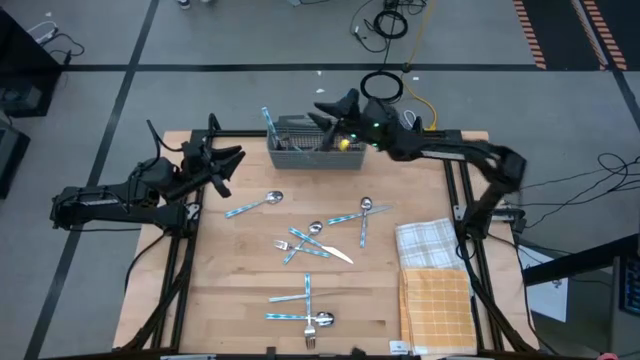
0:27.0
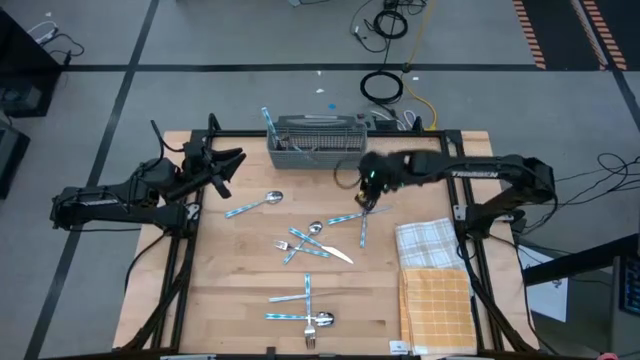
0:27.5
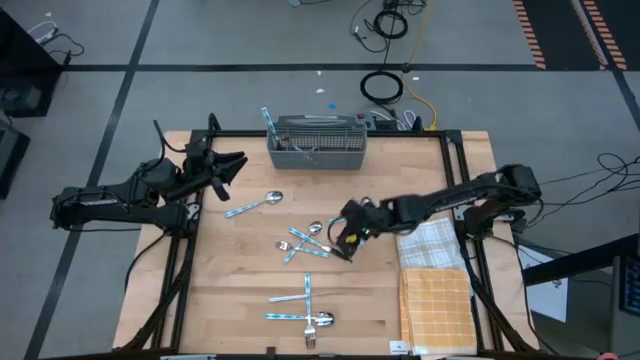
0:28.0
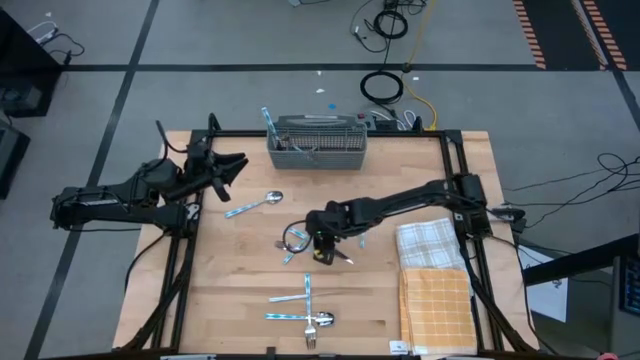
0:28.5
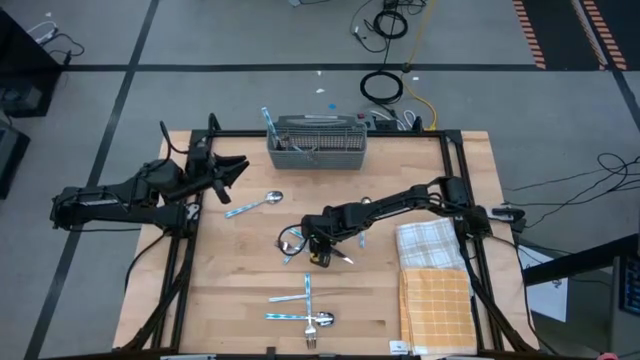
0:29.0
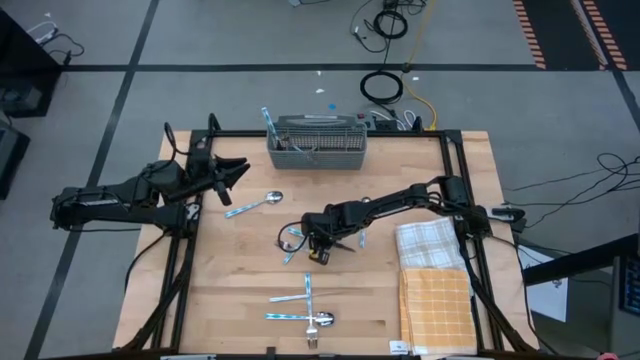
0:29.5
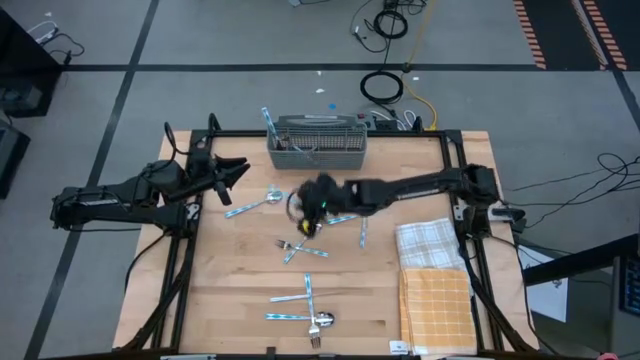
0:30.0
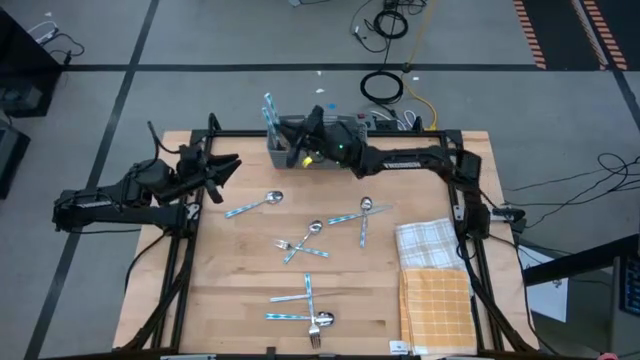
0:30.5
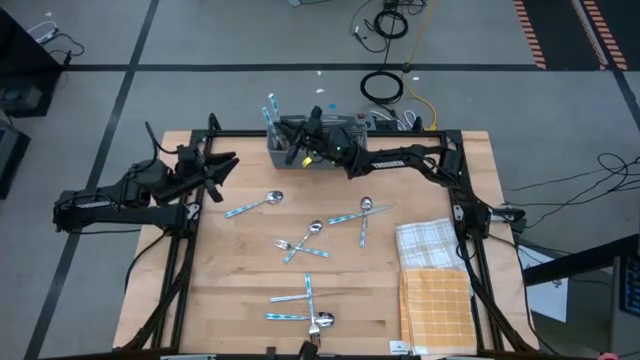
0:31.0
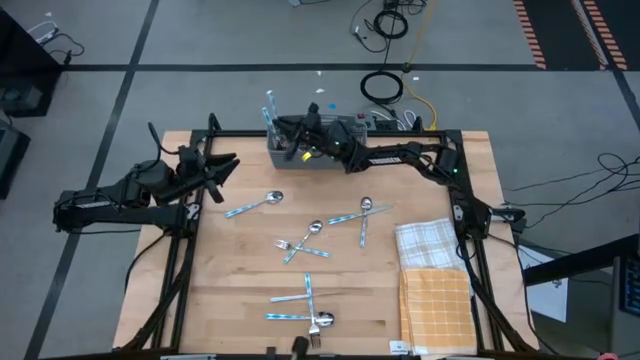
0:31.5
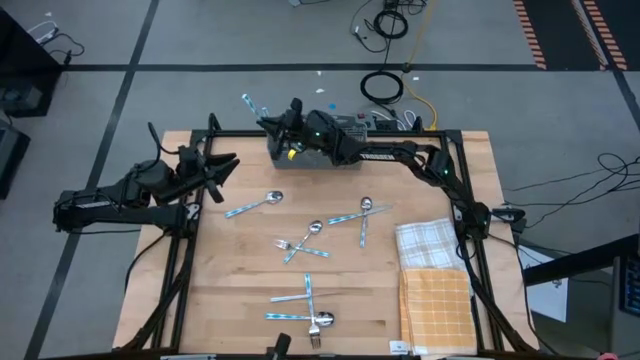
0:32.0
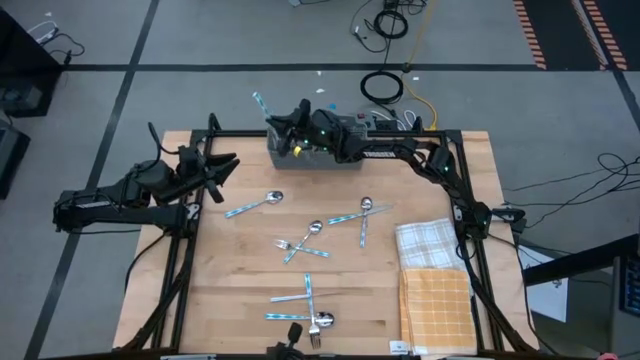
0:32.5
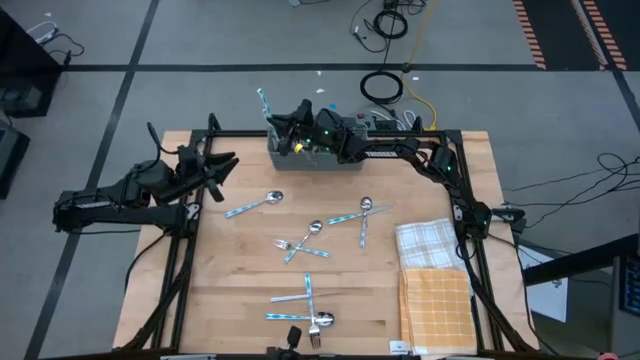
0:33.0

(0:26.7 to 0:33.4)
Task: Sort silverware
Put the middle knife into the left section of the utensil holder

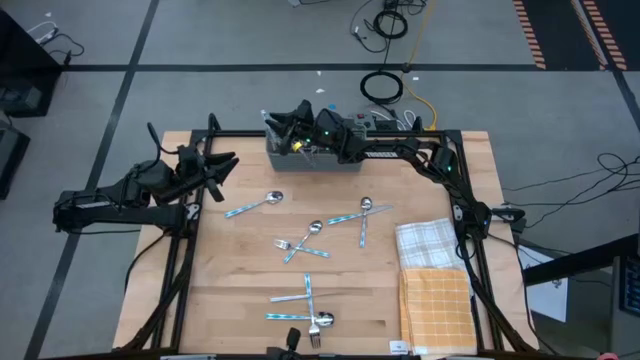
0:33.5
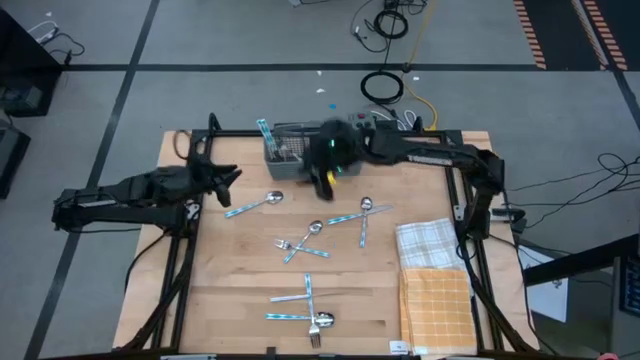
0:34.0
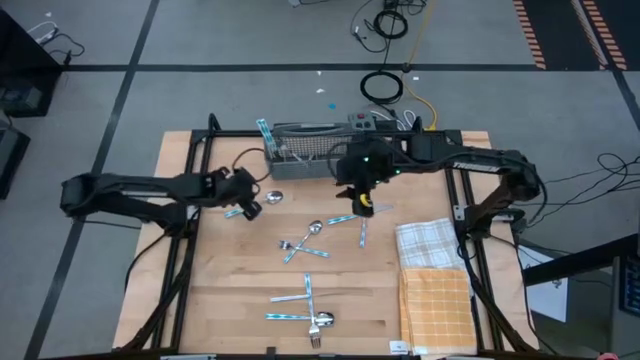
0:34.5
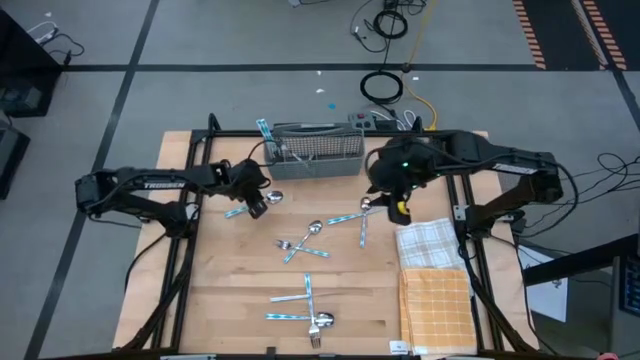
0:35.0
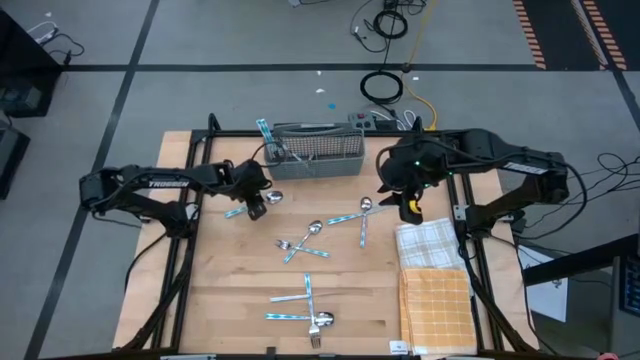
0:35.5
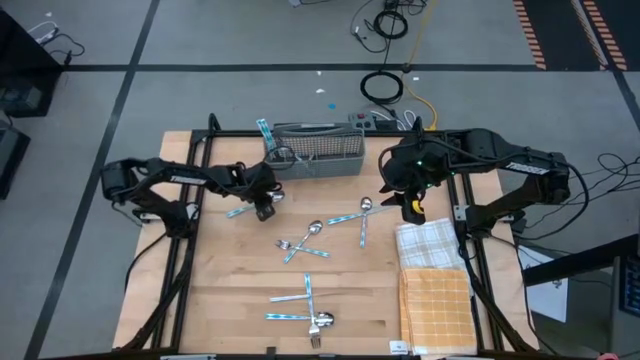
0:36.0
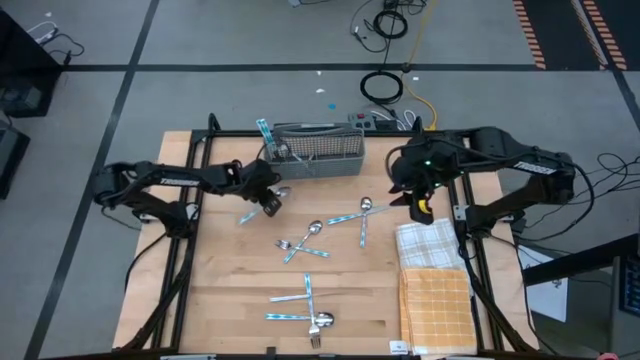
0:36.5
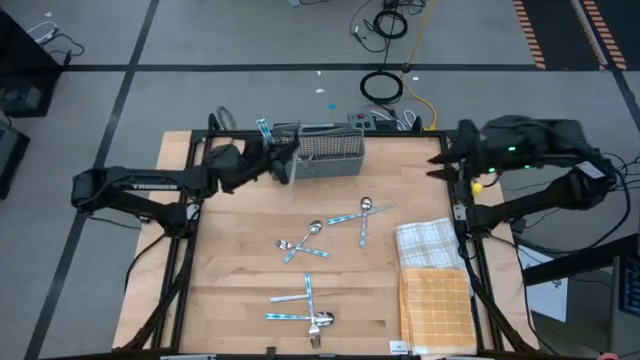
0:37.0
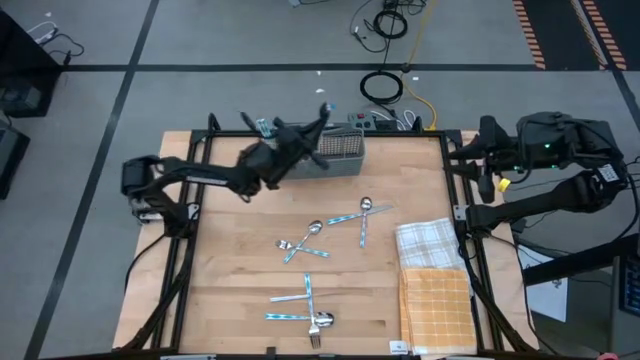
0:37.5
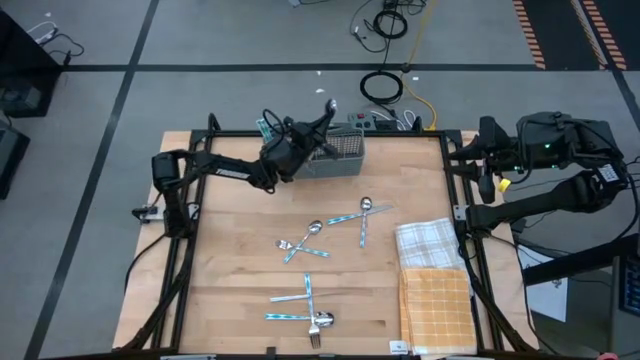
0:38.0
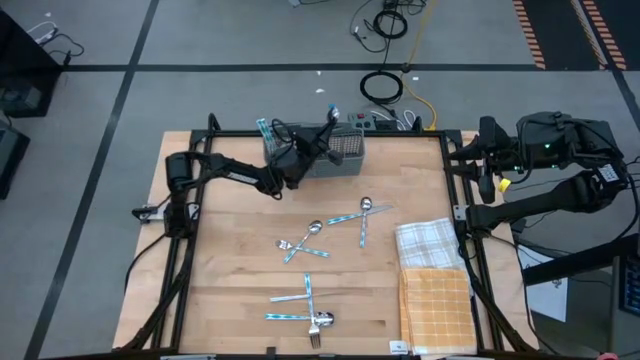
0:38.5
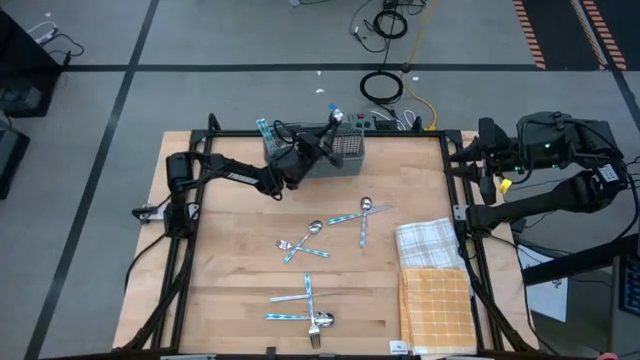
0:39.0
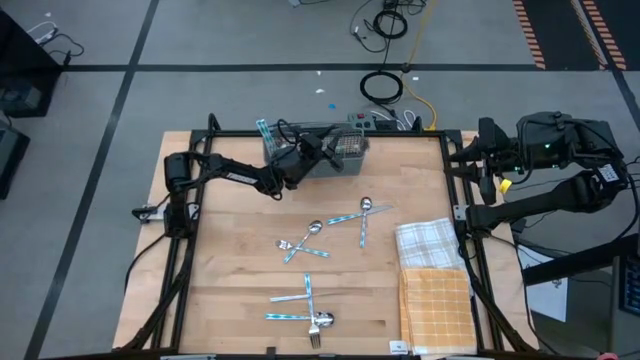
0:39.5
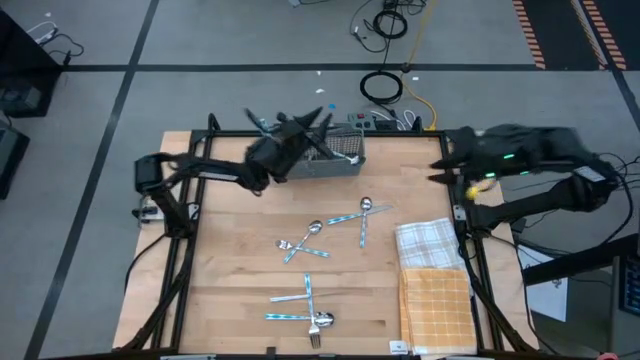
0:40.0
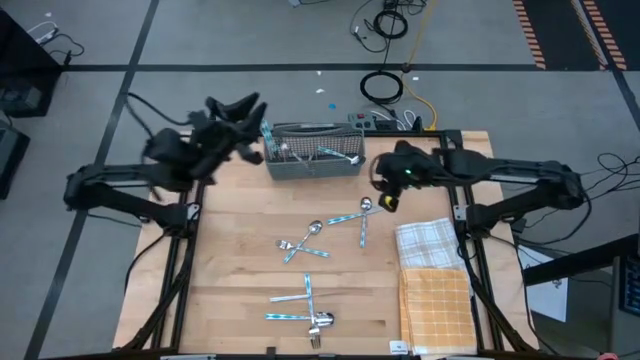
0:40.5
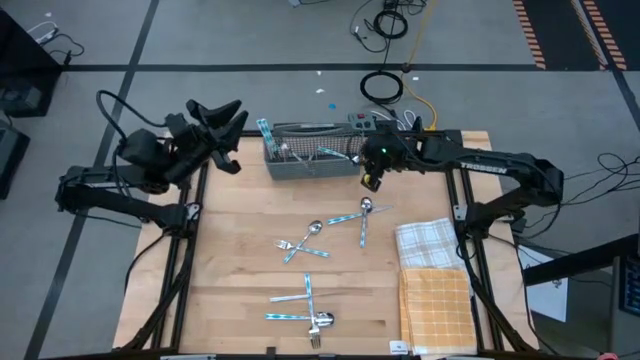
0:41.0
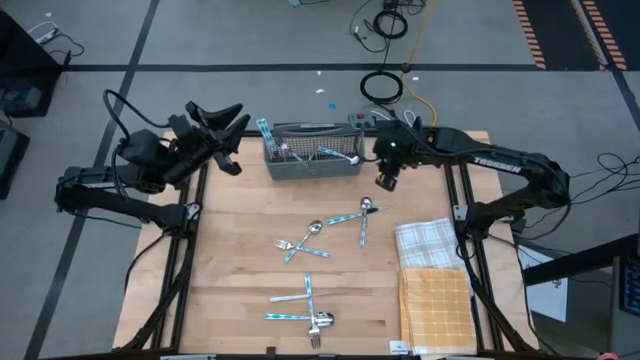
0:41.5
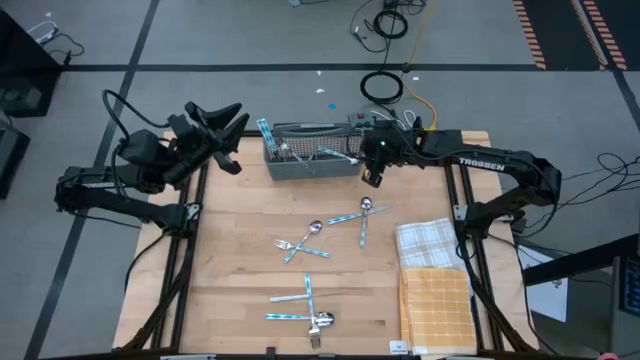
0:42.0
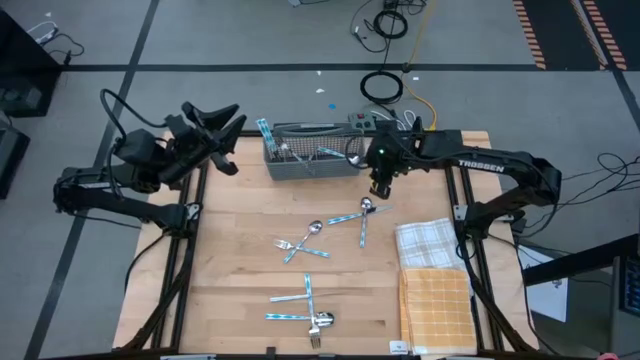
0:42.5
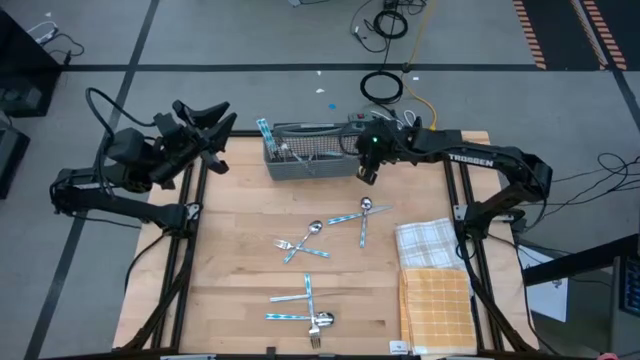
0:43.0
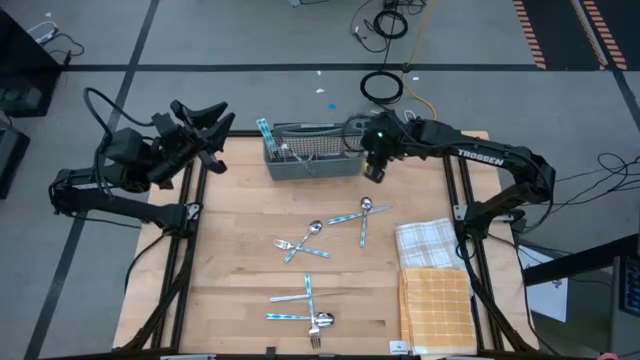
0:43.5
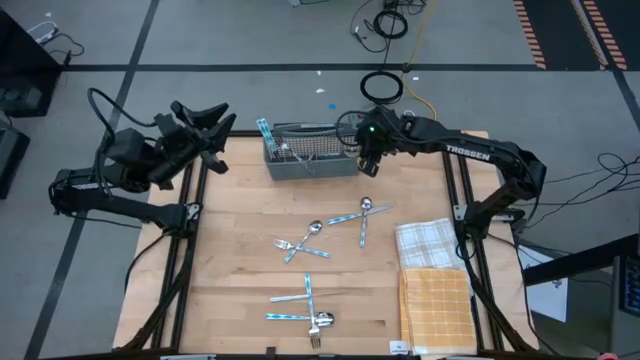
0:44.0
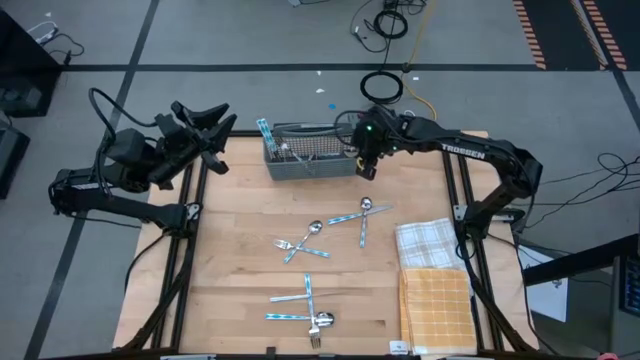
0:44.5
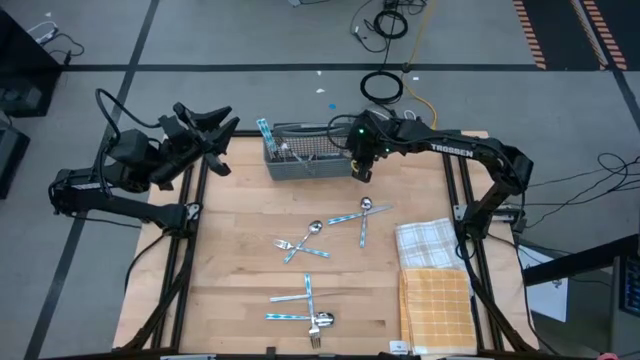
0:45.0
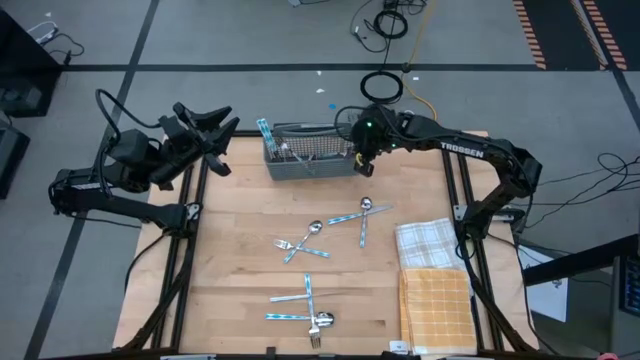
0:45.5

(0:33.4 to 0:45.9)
Put the spoon into the middle right section of the utensil holder

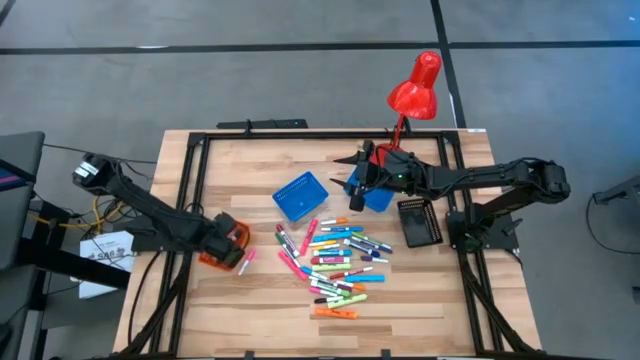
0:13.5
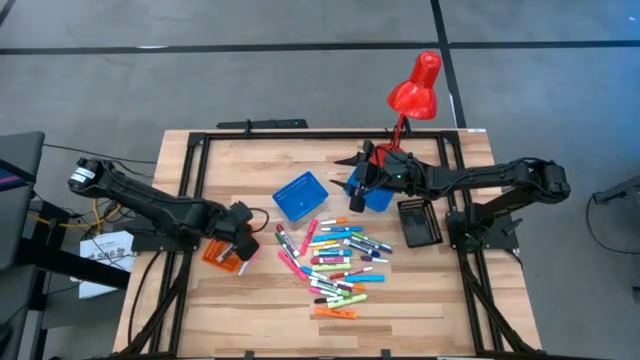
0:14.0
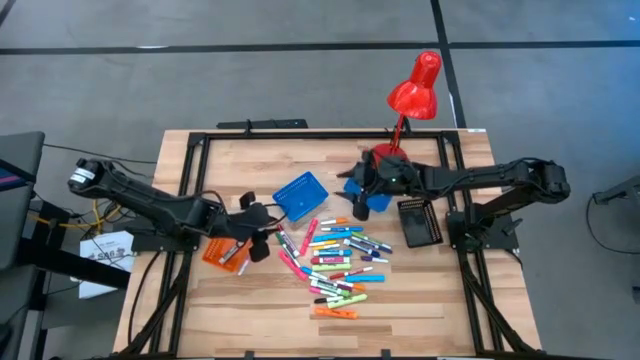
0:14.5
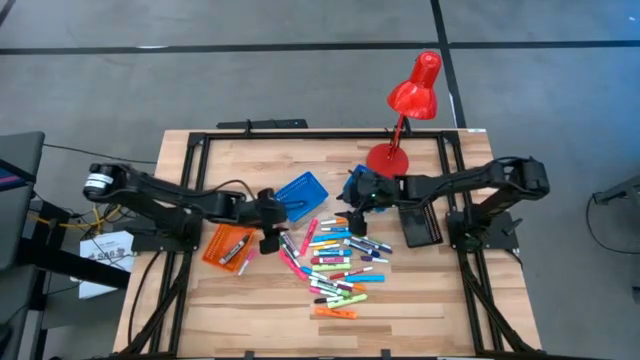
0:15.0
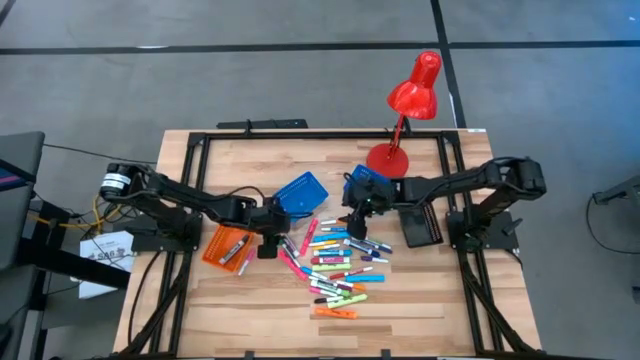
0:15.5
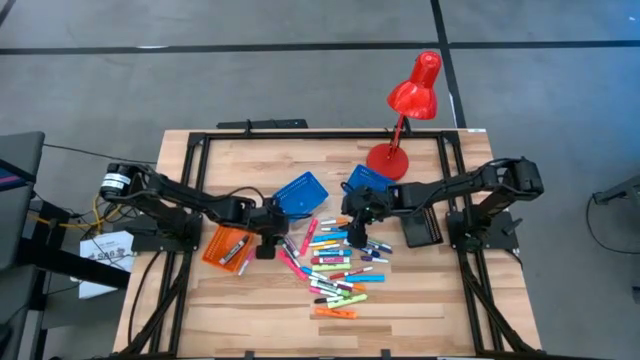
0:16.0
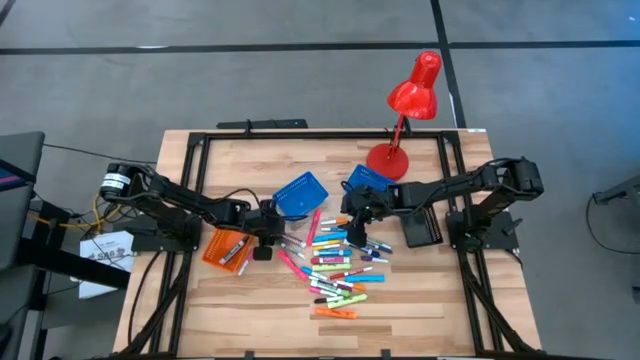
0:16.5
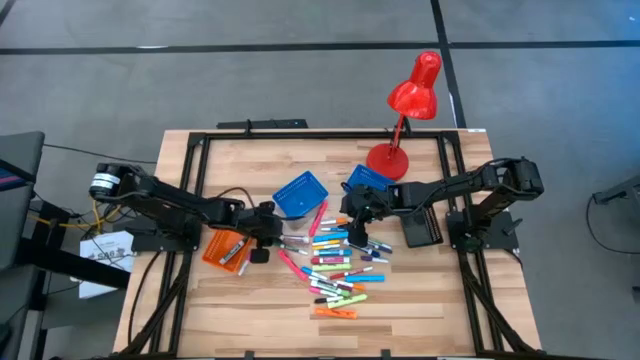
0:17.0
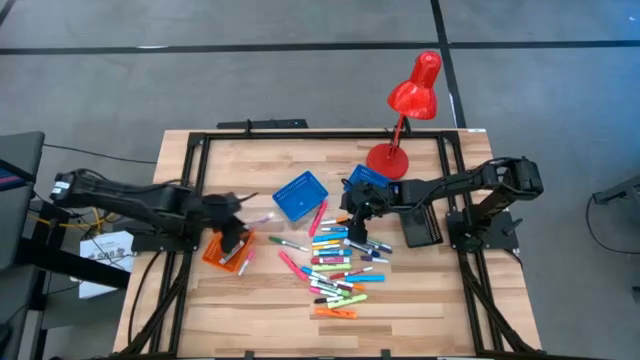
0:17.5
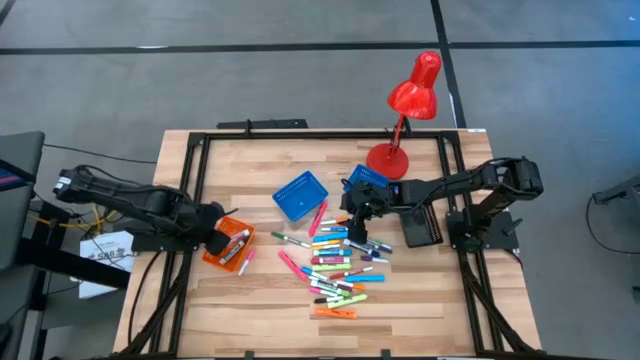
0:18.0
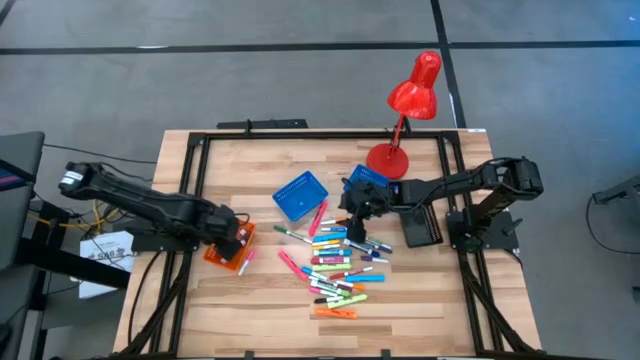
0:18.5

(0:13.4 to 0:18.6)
Task: Pick & Place Markers
Put the large red marker pen into the orange bin
